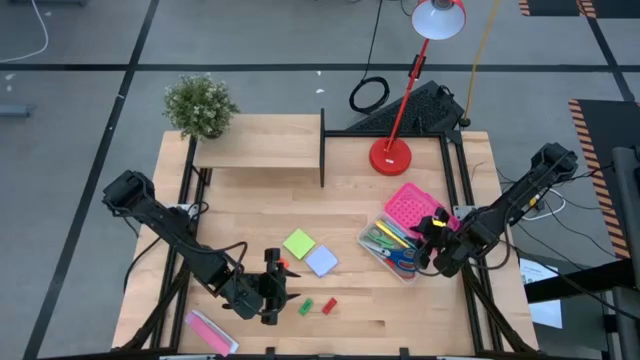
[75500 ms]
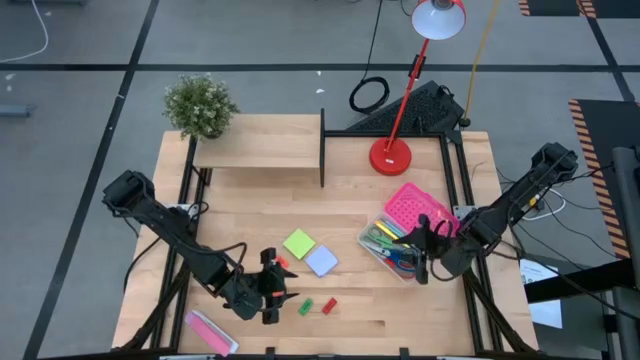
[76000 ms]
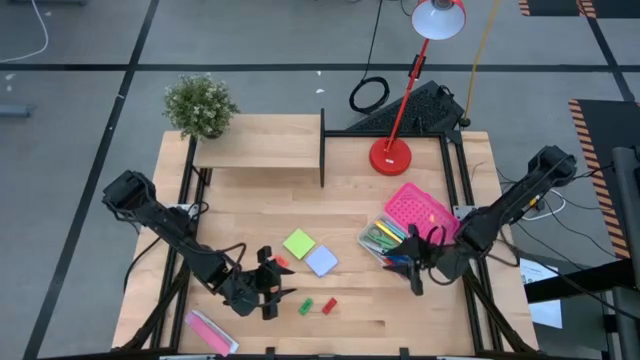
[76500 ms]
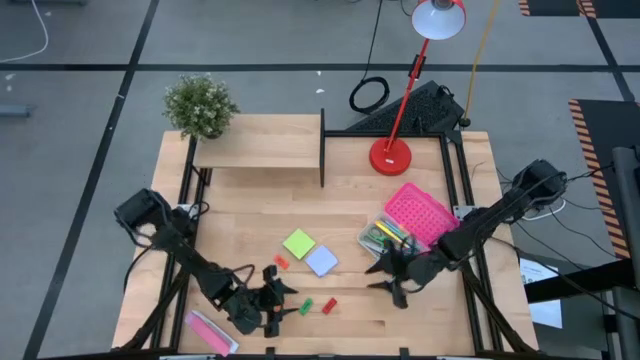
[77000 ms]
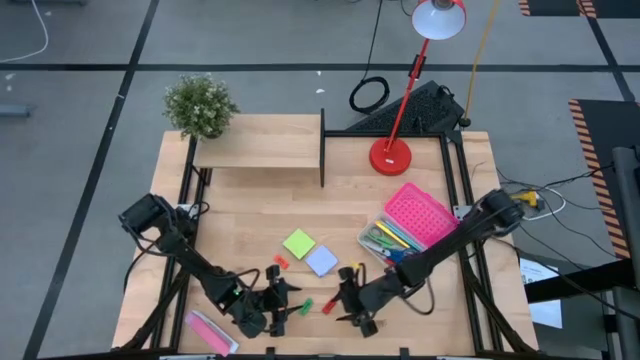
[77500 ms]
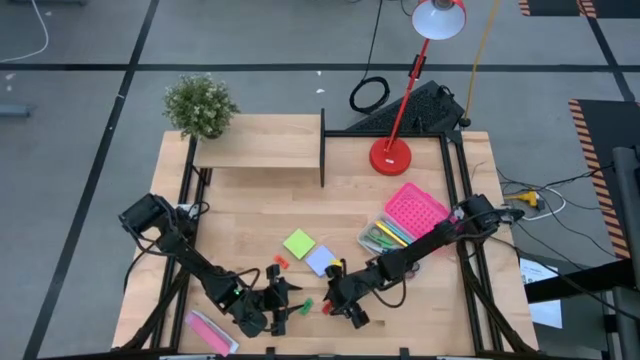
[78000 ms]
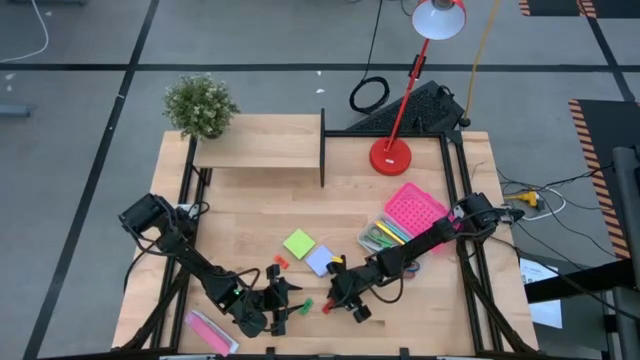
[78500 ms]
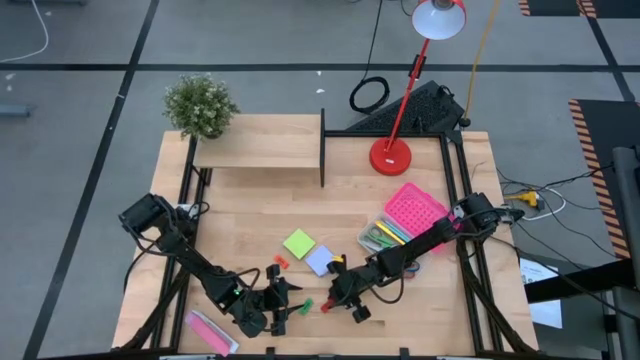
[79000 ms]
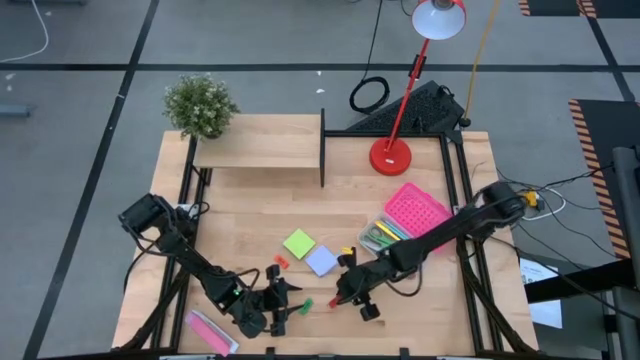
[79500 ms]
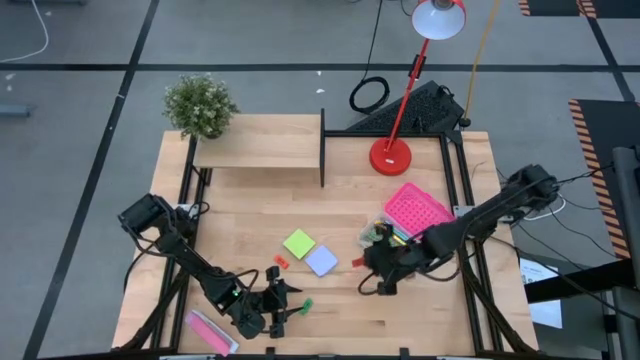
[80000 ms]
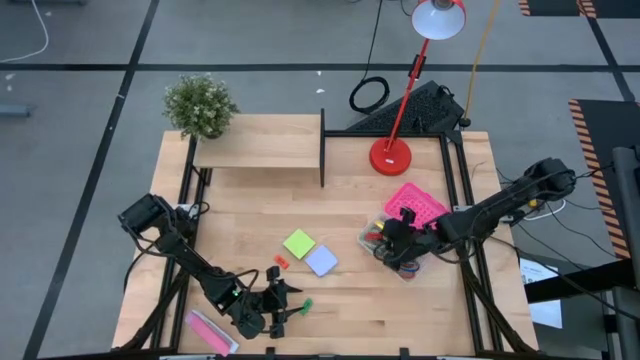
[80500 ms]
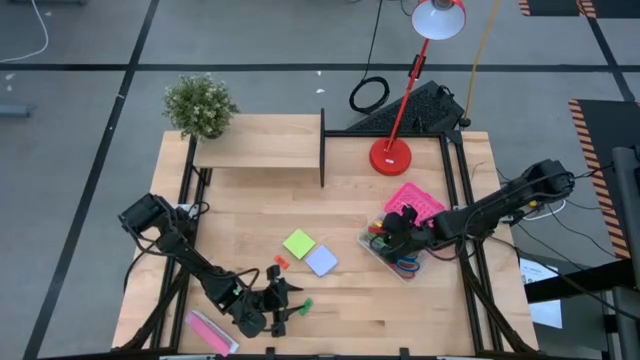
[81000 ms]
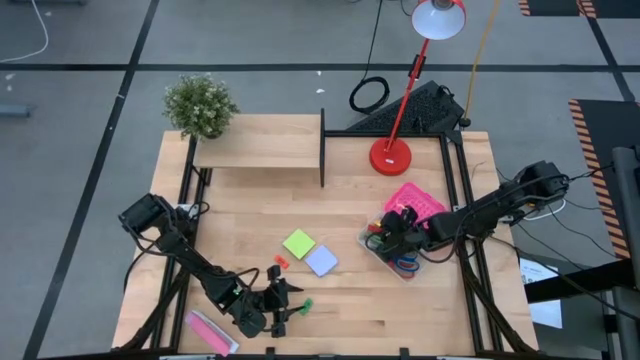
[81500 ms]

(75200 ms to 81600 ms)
Task: Pack school essentials
Put the red eraser into the pink supply box

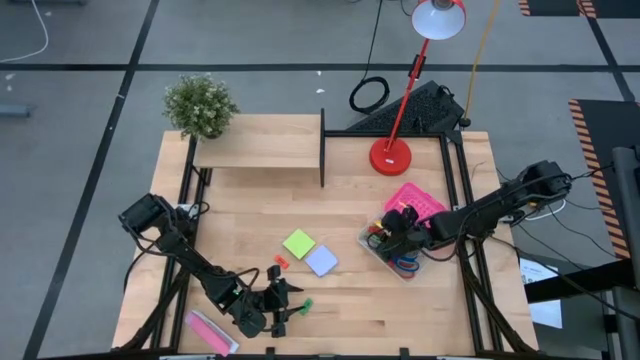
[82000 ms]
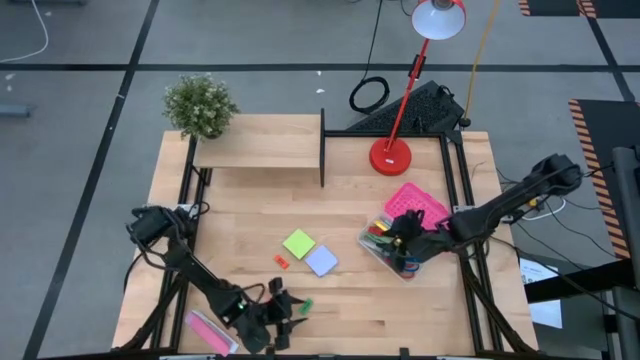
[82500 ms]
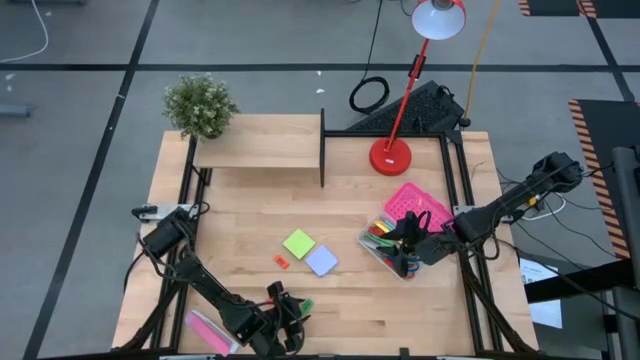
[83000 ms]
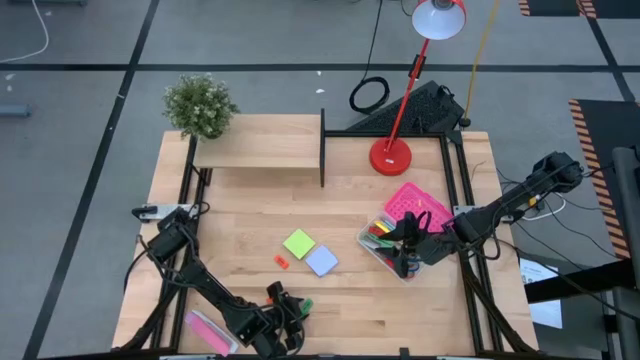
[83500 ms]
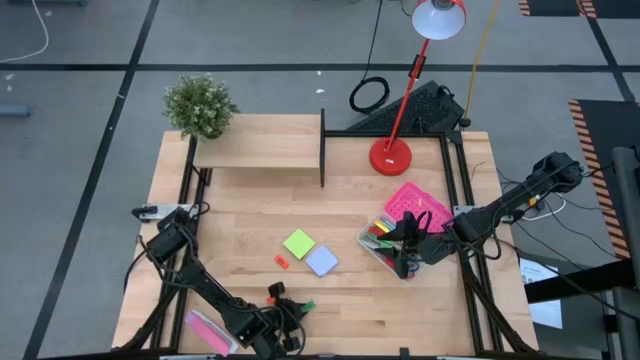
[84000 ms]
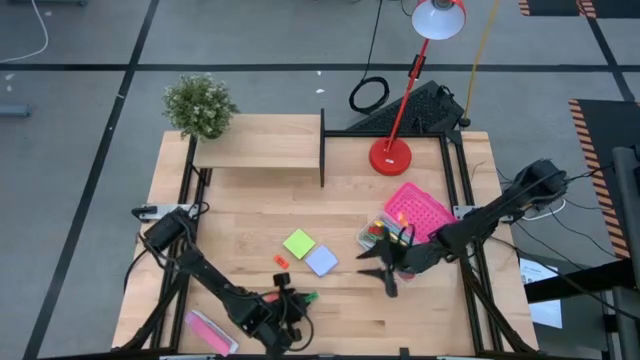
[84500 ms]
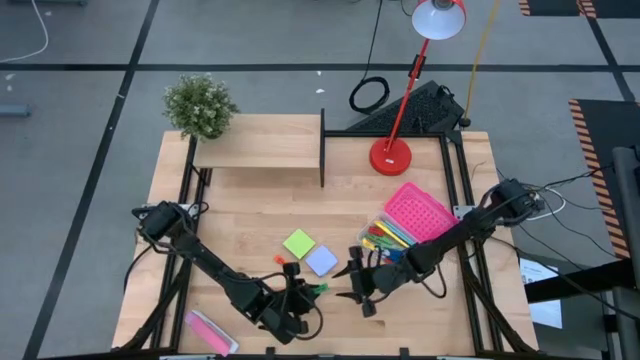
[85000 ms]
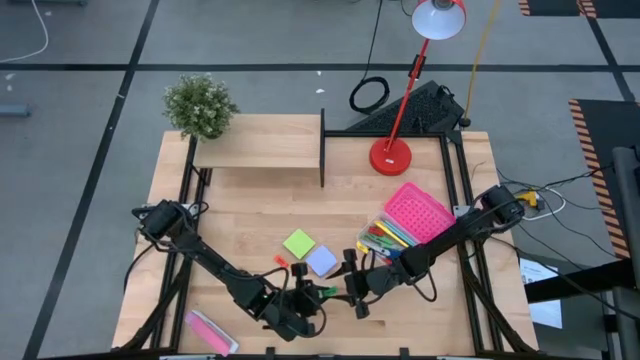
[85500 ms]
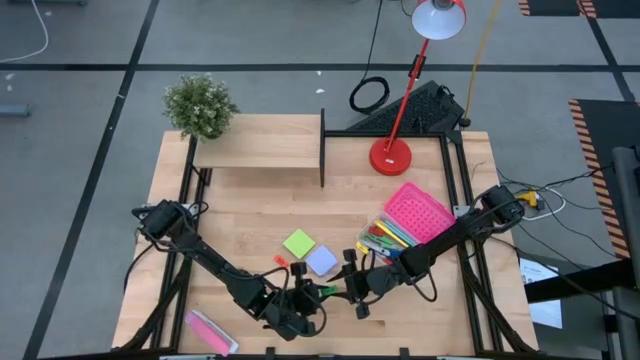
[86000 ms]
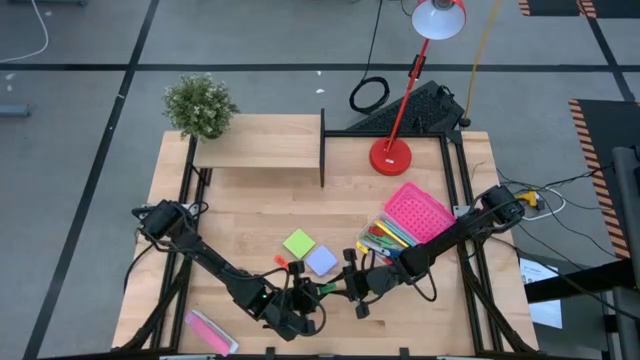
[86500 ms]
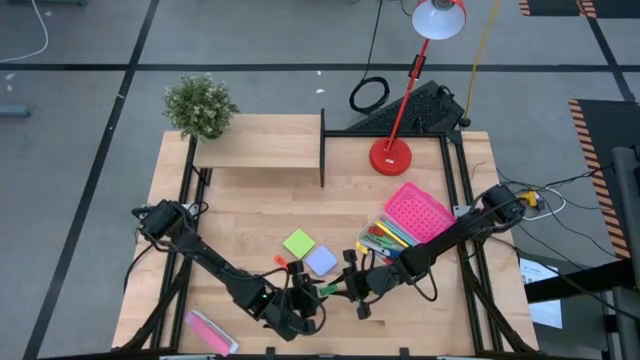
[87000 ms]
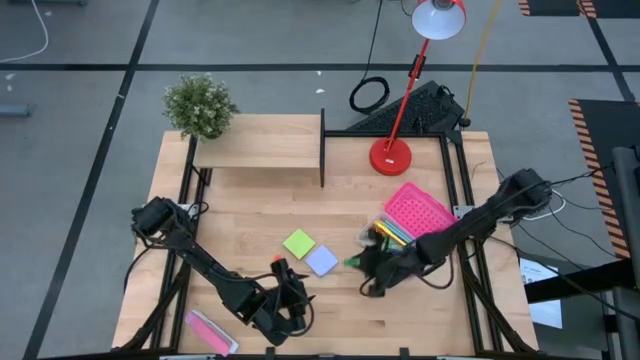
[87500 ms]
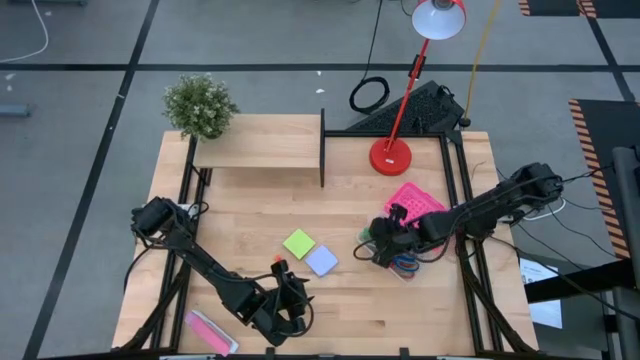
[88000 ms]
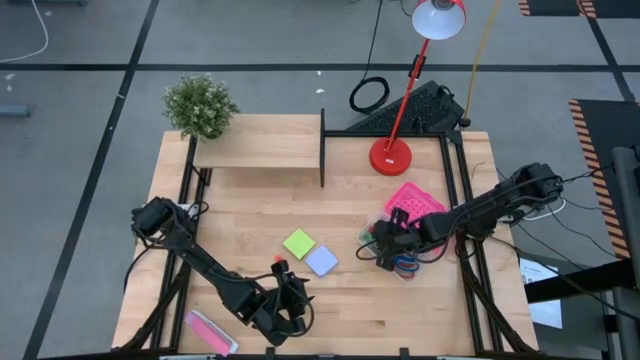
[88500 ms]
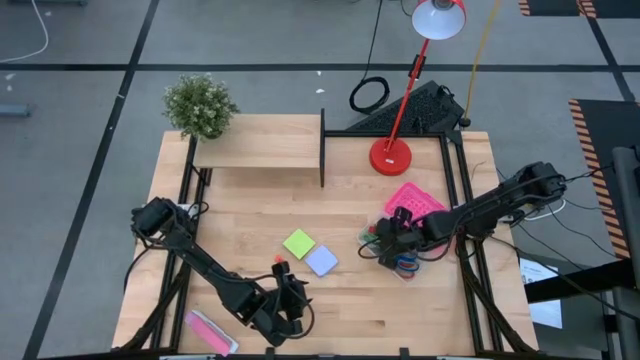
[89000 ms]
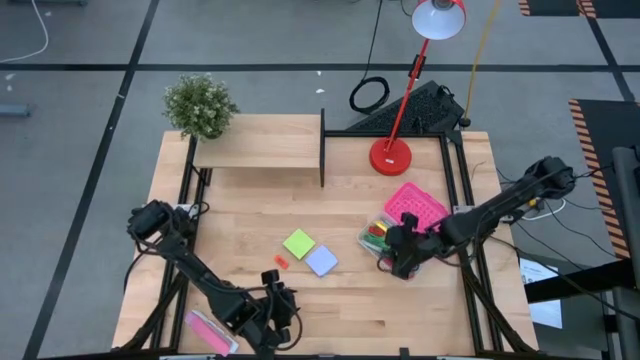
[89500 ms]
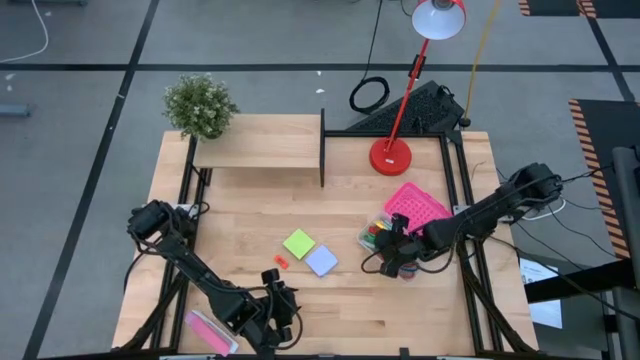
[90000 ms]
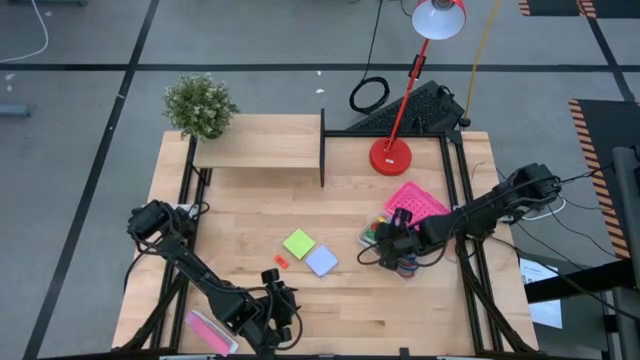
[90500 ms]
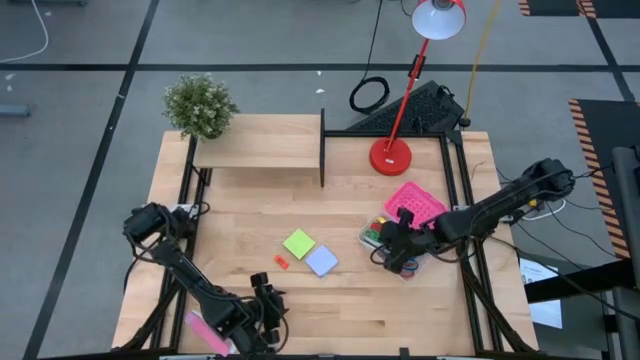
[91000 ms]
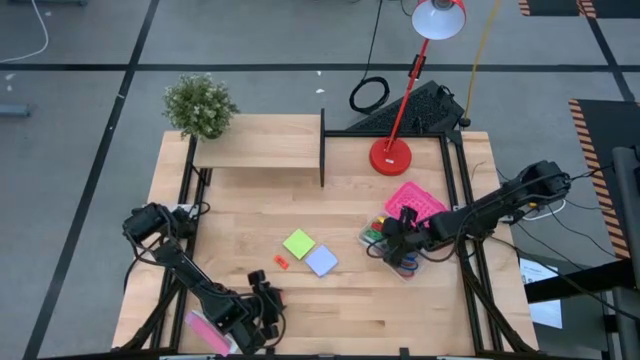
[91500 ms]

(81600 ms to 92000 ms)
Put the green eraser into the pink supply box

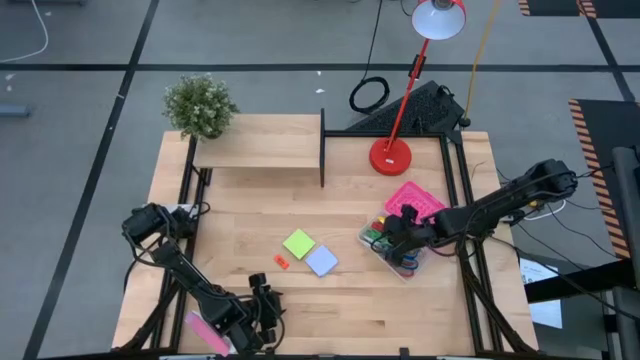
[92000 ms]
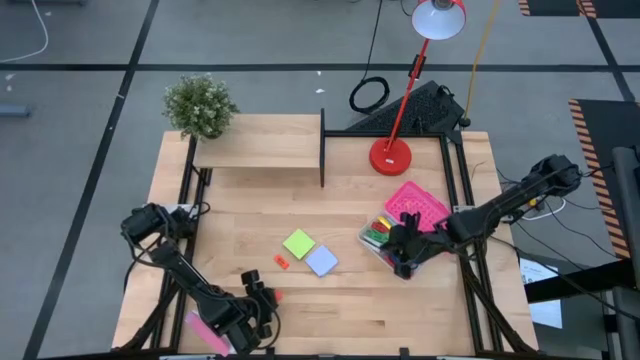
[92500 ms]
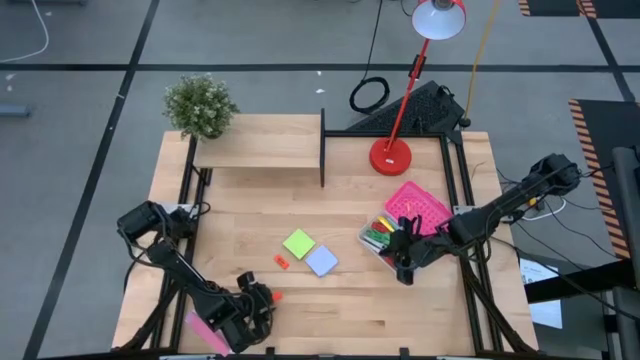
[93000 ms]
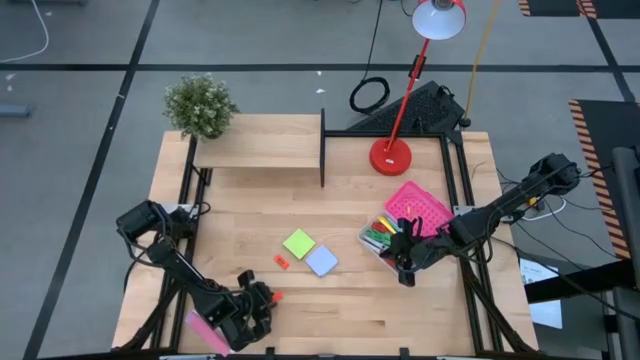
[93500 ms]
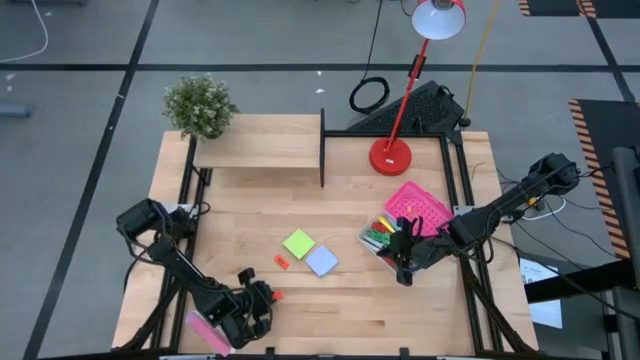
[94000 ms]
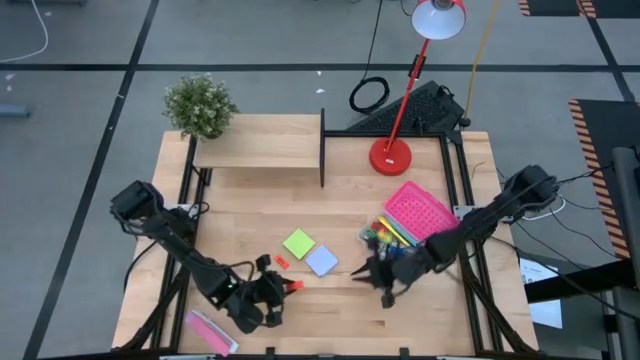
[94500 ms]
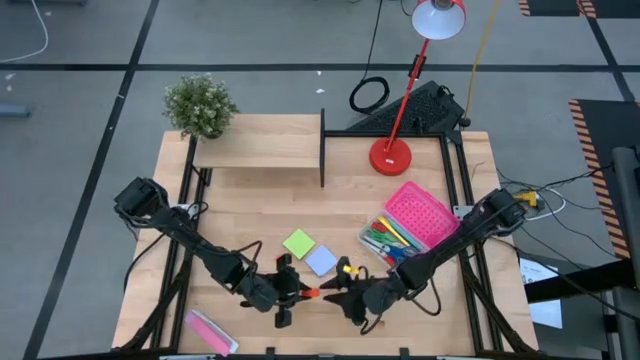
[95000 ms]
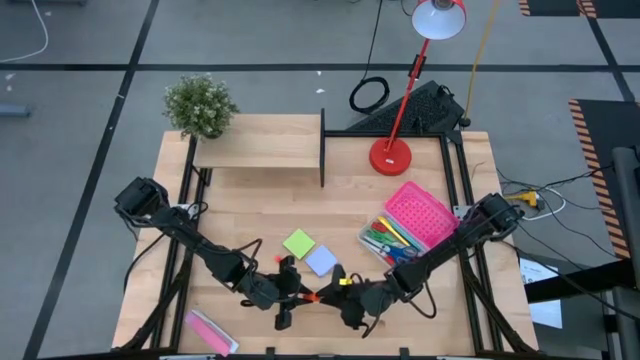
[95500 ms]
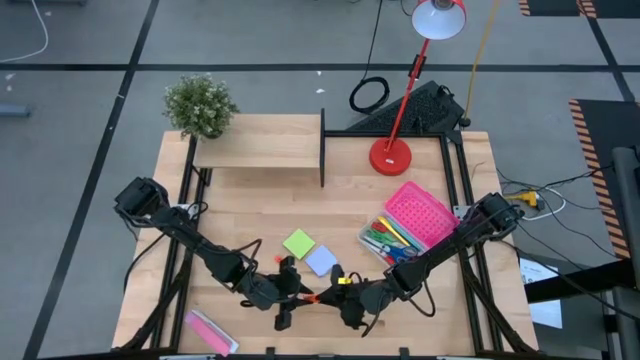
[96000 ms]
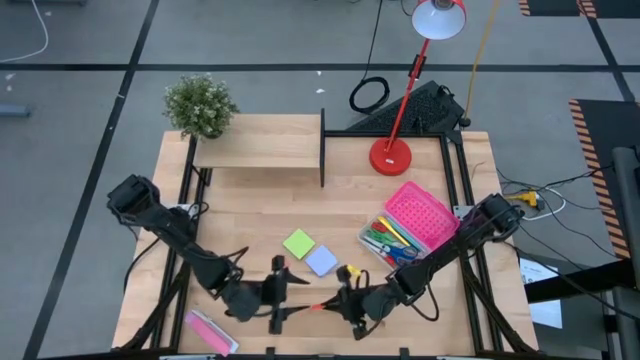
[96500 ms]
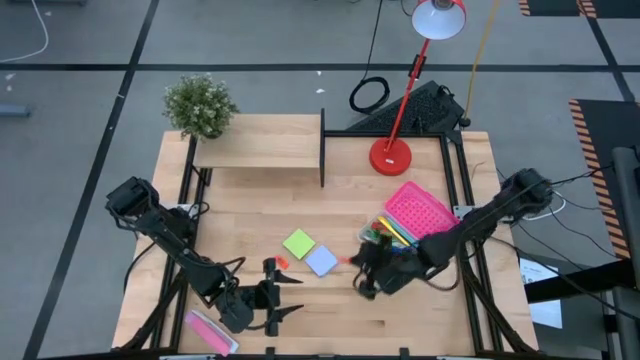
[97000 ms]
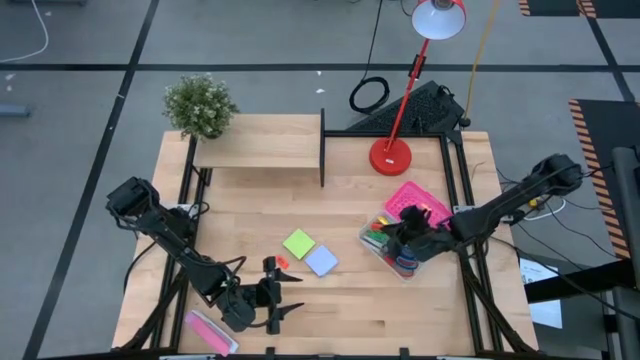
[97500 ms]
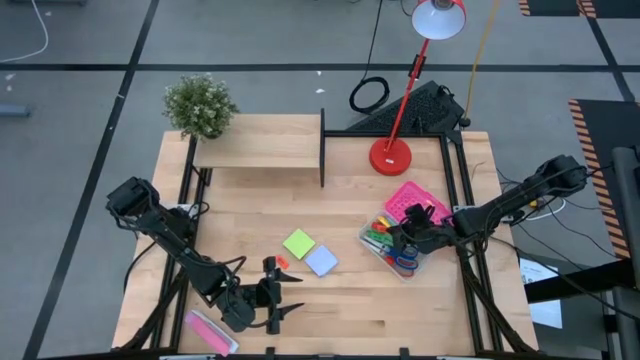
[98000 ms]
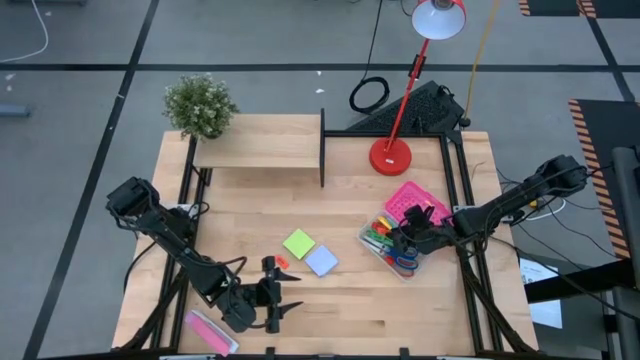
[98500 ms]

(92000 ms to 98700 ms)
Put the bottom orange eraser into the pink supply box
